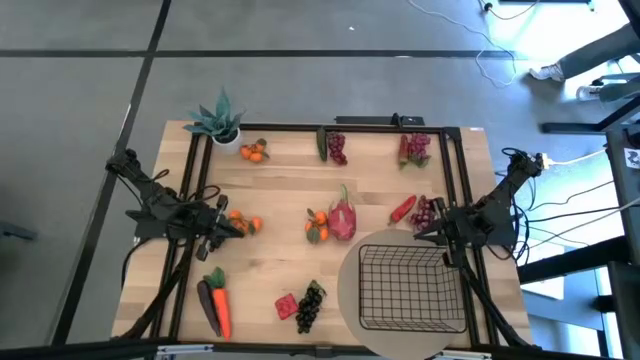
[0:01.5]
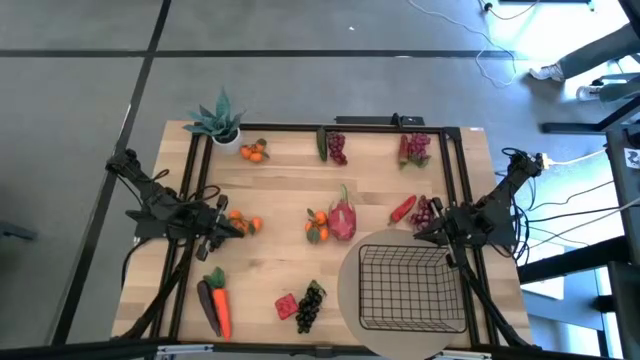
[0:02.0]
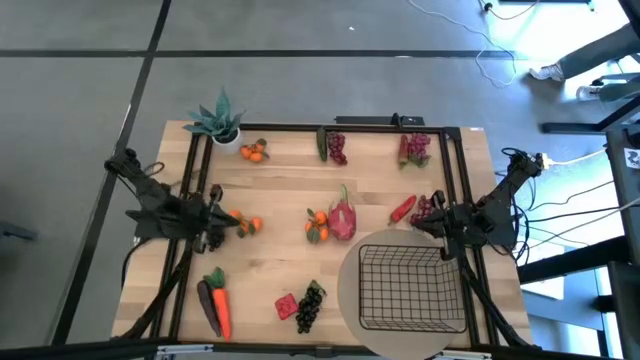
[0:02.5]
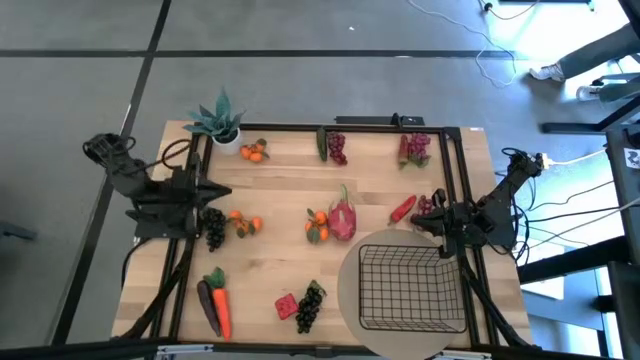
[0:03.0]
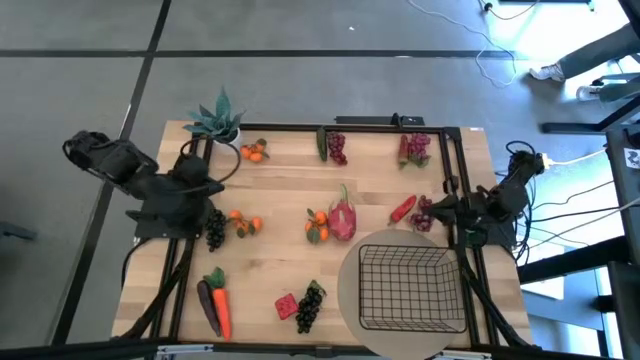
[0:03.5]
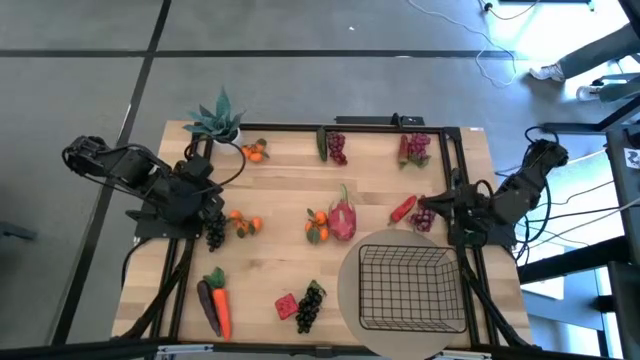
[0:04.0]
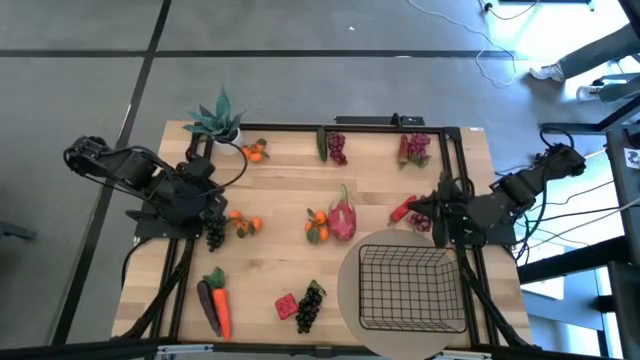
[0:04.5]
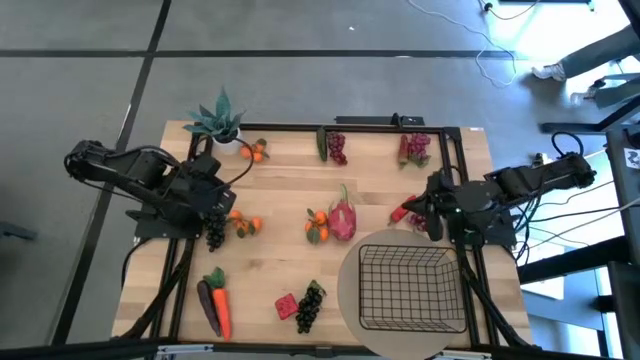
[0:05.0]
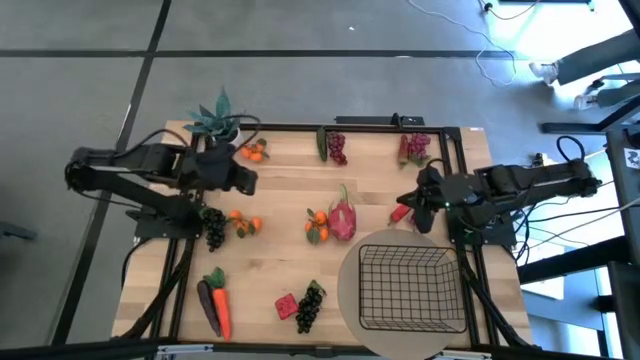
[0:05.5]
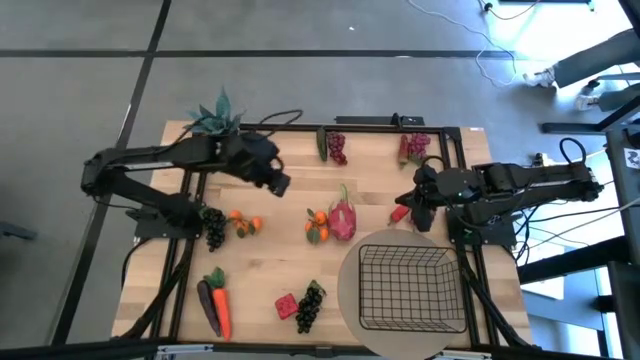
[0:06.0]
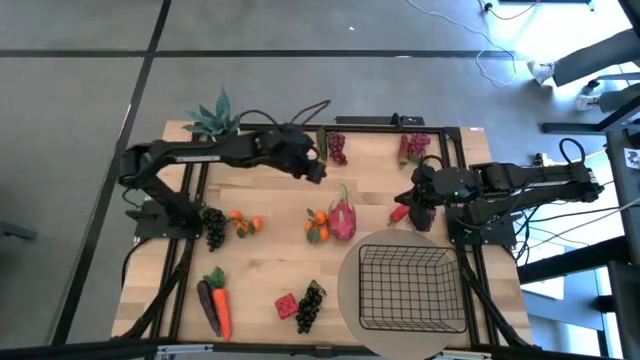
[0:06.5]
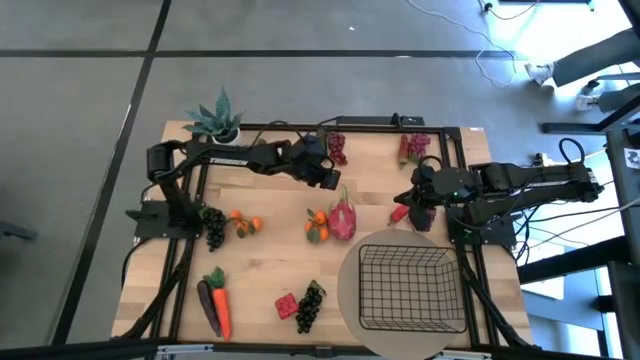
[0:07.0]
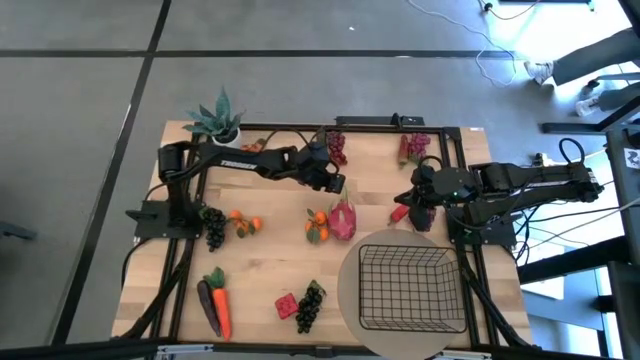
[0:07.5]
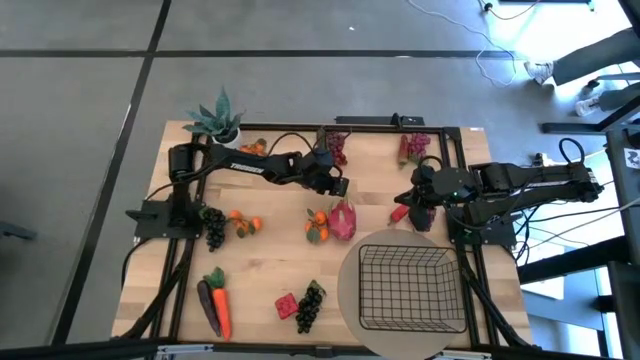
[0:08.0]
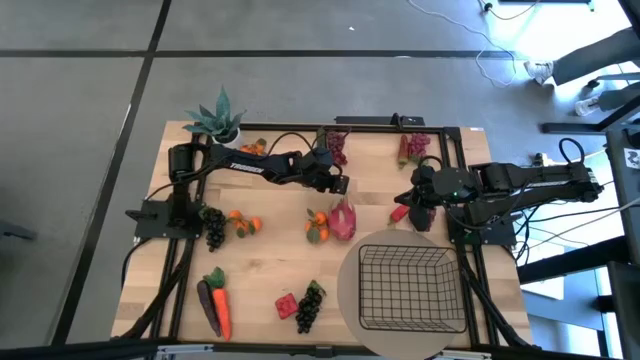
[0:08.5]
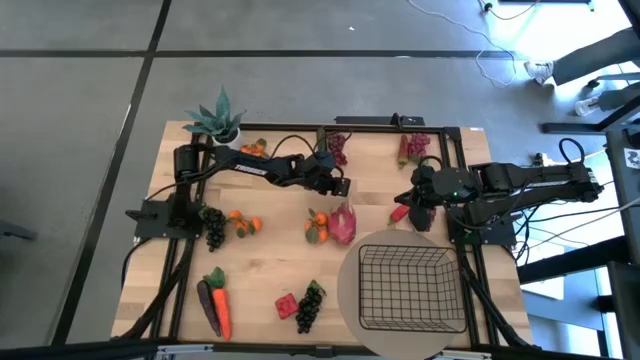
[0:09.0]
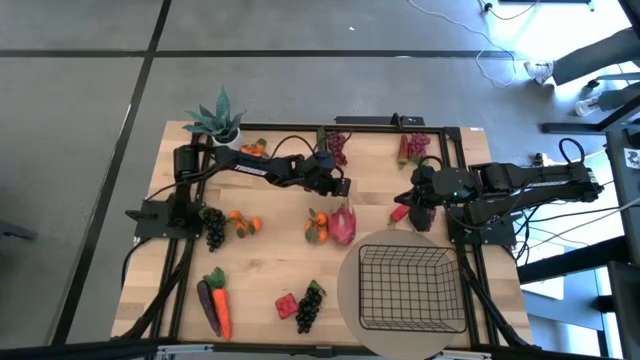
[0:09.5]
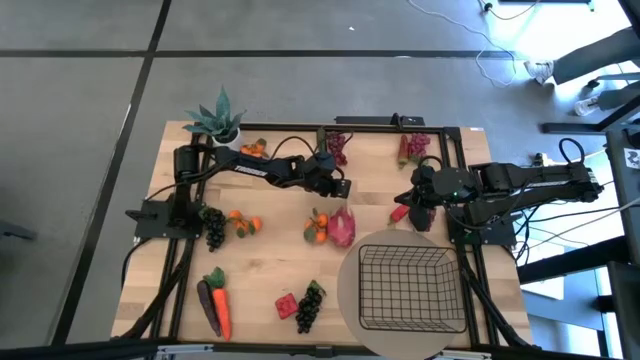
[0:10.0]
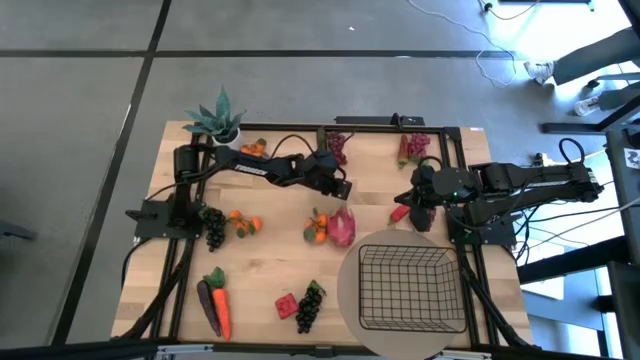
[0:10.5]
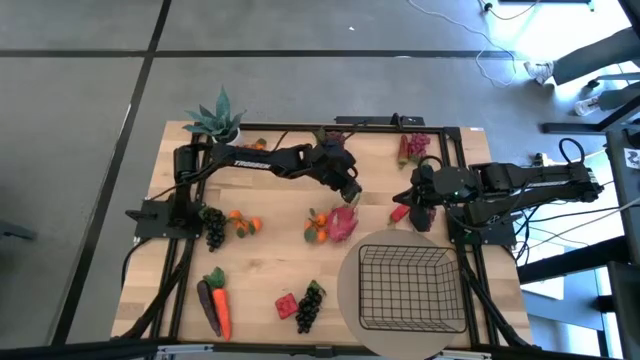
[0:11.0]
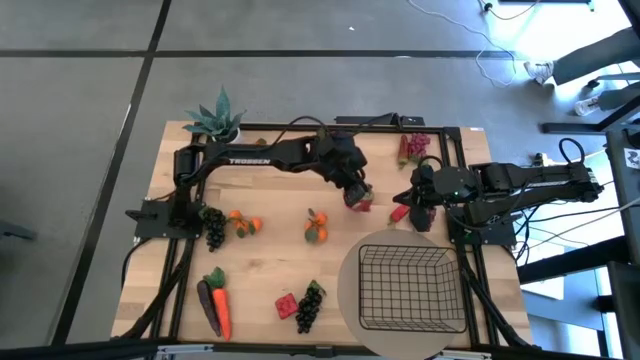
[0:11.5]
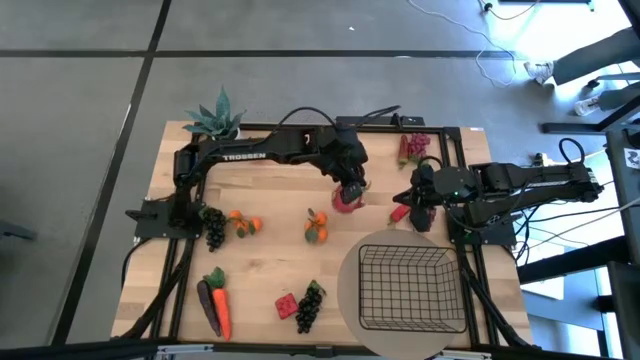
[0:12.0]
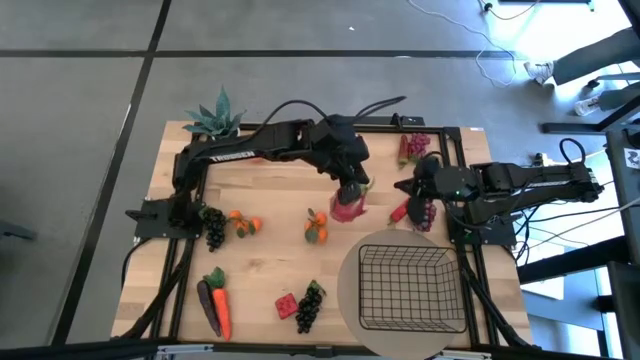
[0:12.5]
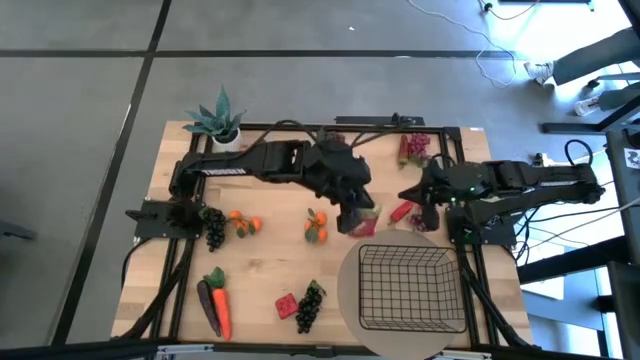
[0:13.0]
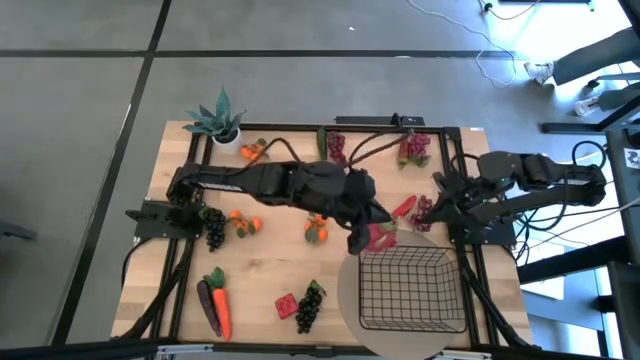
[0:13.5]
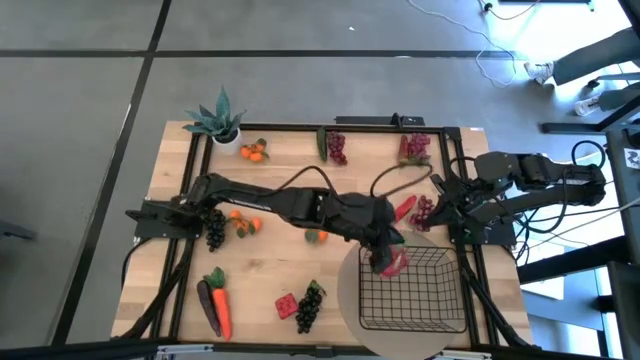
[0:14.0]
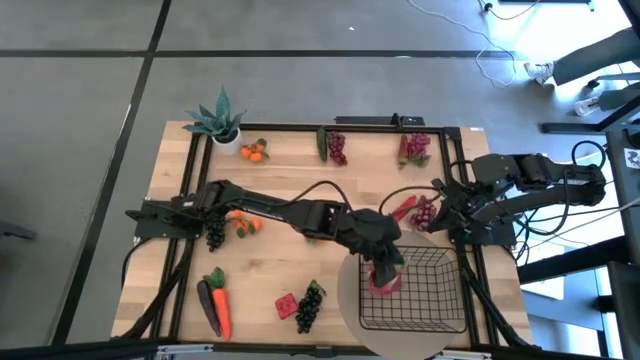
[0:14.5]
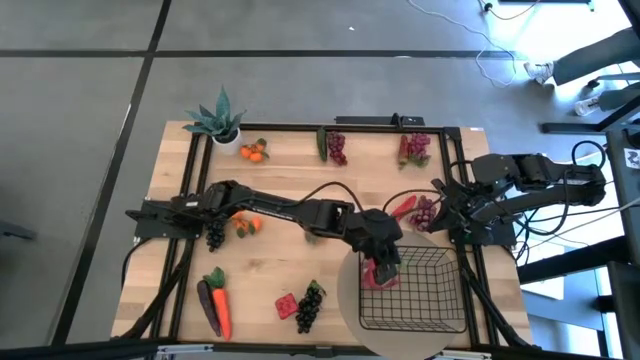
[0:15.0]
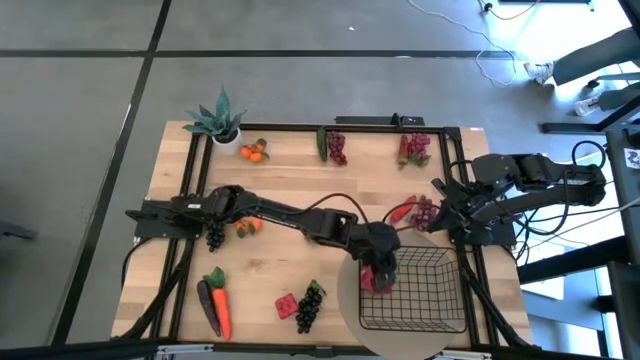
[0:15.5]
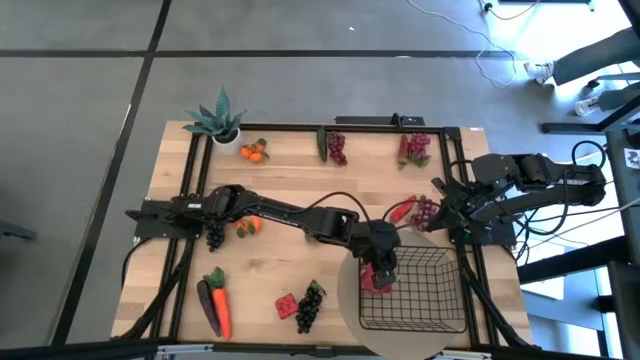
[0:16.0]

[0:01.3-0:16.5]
Task: Build produce basket
Put the dragon fruit into the black wire basket

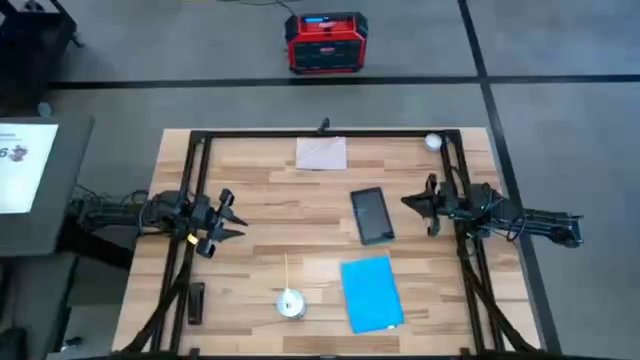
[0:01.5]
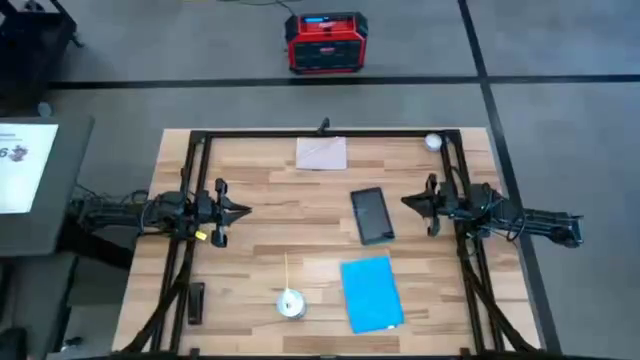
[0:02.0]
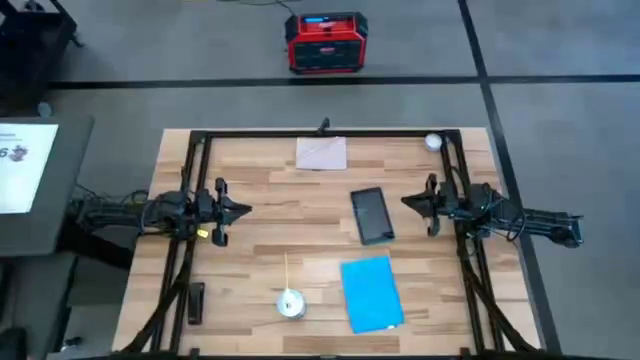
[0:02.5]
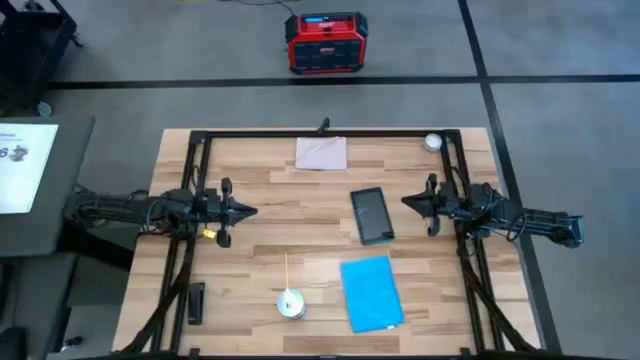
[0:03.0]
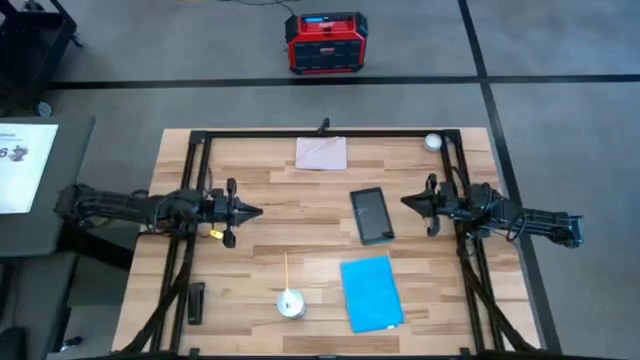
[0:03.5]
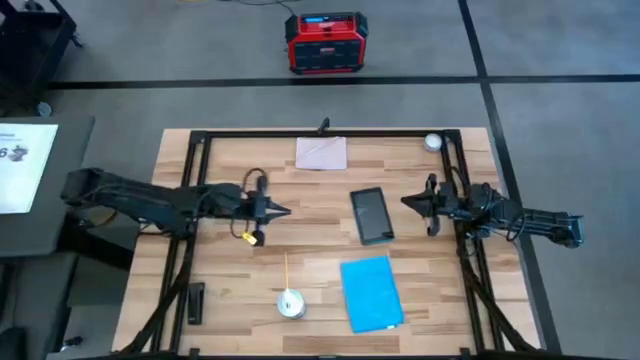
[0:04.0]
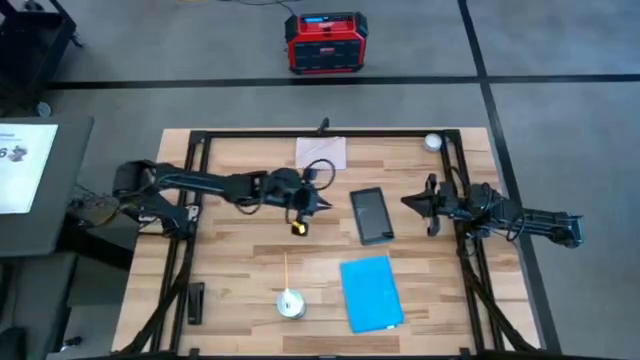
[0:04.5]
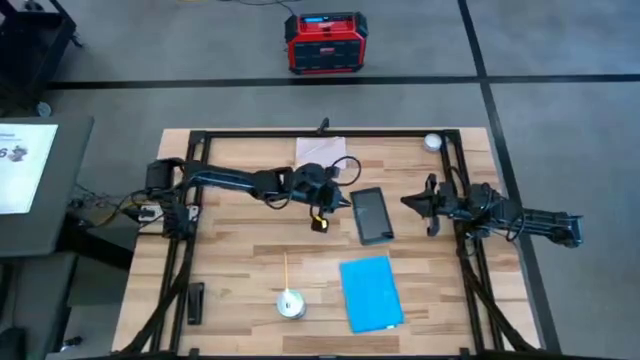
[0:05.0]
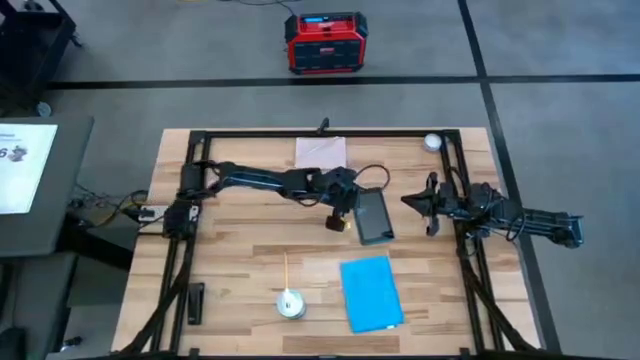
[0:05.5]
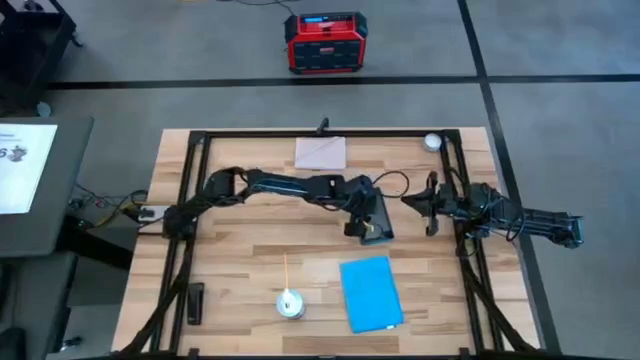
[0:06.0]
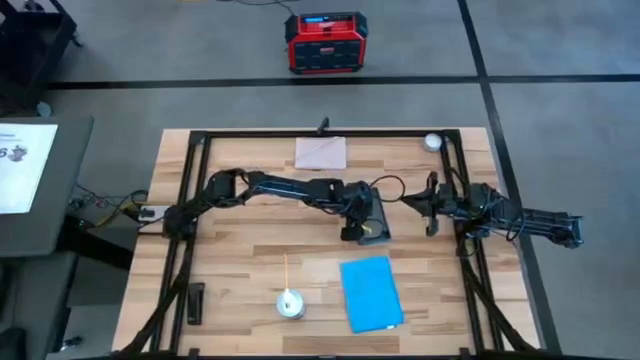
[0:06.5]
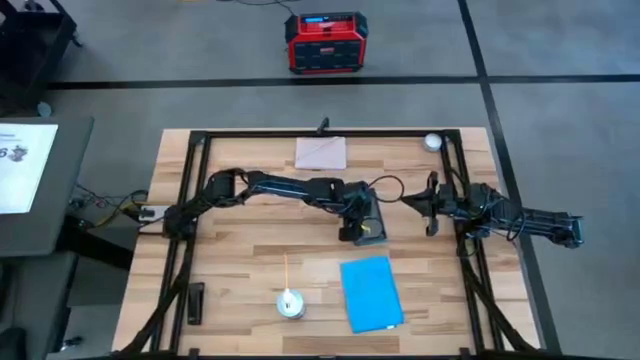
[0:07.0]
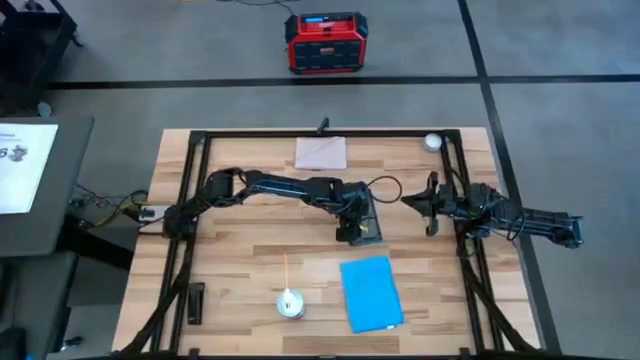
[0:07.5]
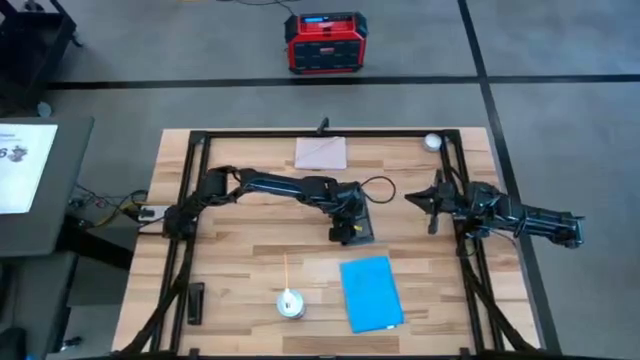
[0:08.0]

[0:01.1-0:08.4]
Task: Apply microfiber cloth
Move the tablet to the center of the table
